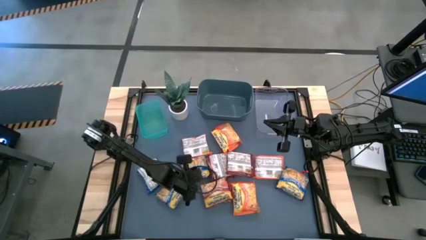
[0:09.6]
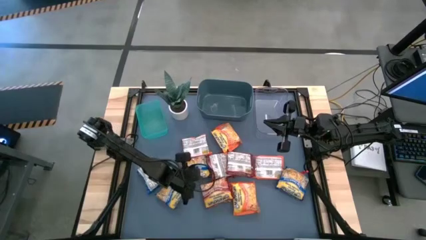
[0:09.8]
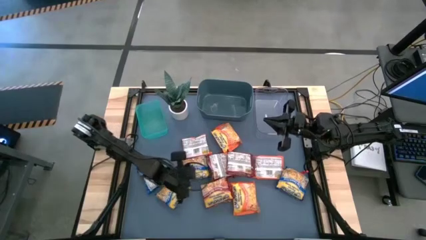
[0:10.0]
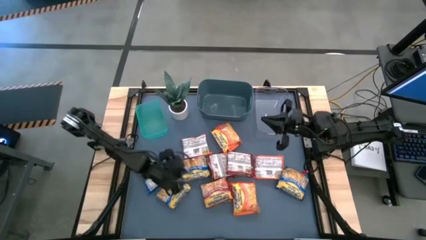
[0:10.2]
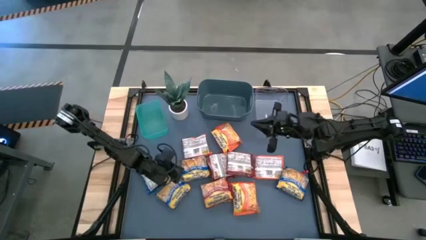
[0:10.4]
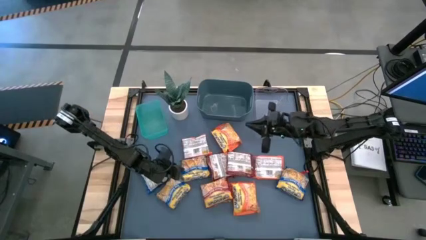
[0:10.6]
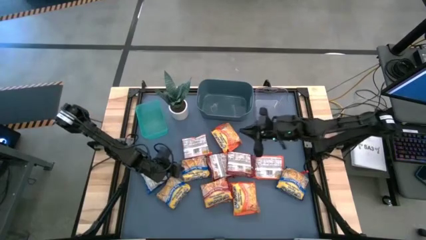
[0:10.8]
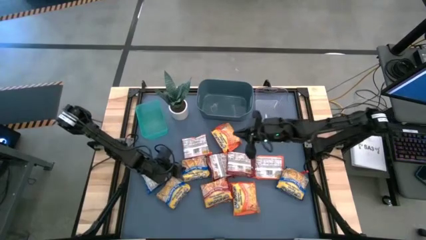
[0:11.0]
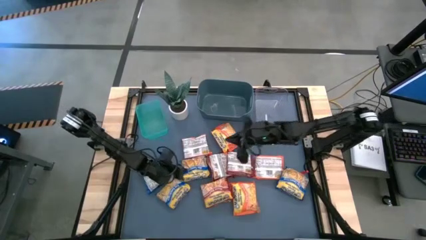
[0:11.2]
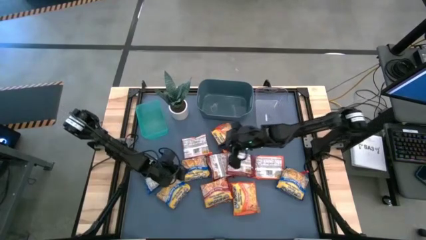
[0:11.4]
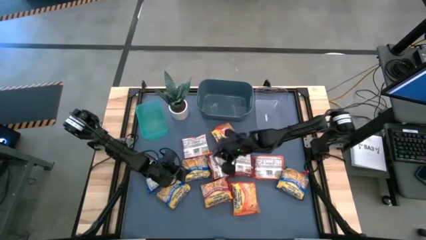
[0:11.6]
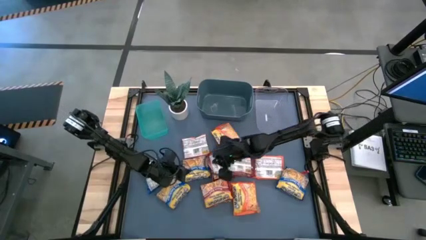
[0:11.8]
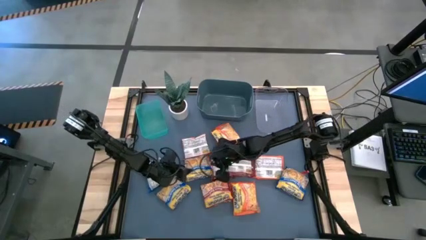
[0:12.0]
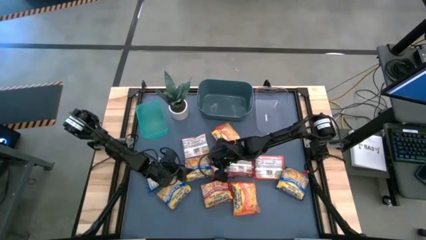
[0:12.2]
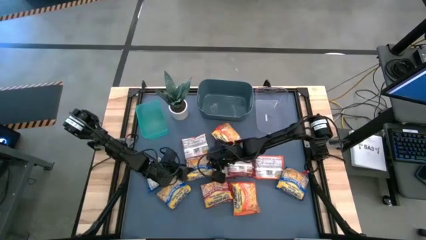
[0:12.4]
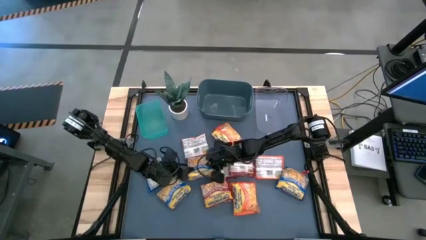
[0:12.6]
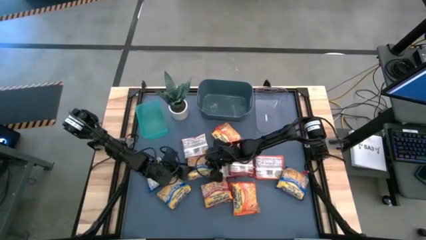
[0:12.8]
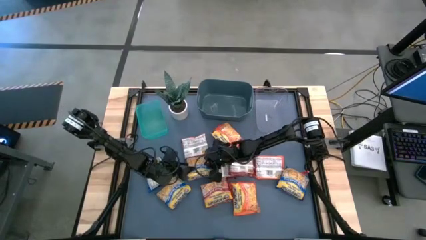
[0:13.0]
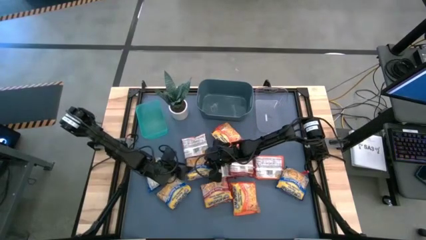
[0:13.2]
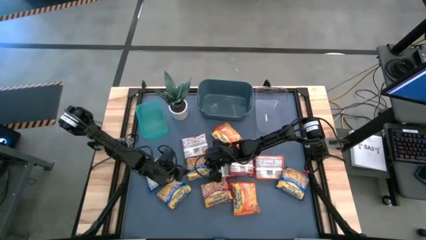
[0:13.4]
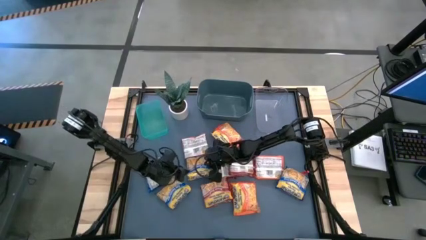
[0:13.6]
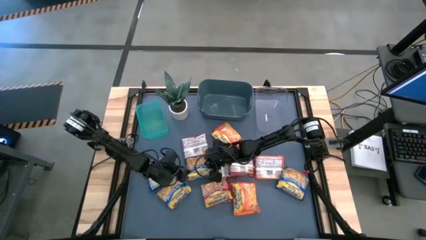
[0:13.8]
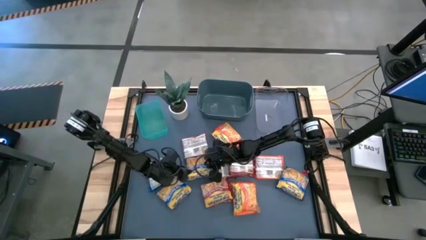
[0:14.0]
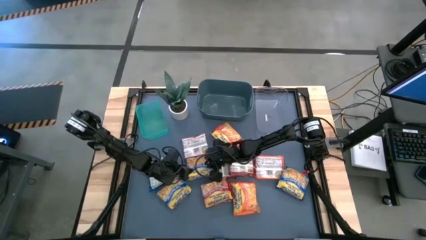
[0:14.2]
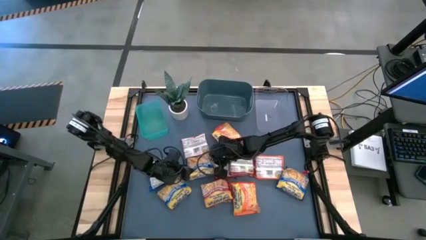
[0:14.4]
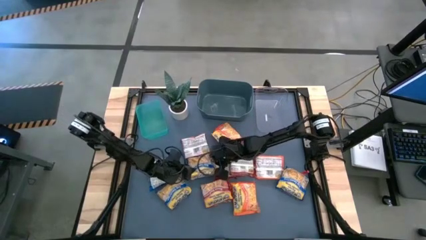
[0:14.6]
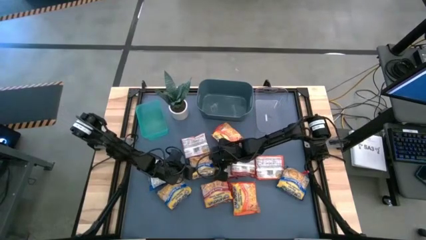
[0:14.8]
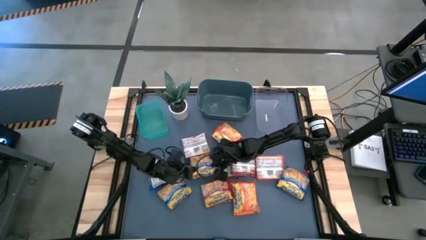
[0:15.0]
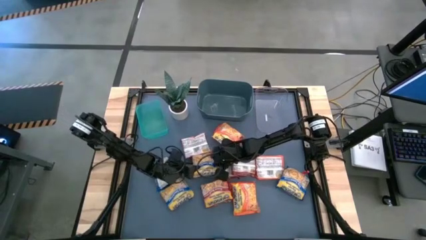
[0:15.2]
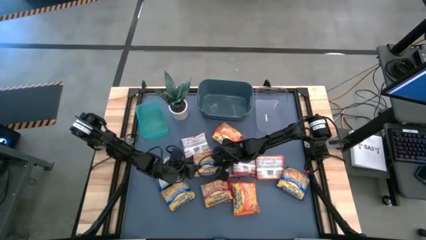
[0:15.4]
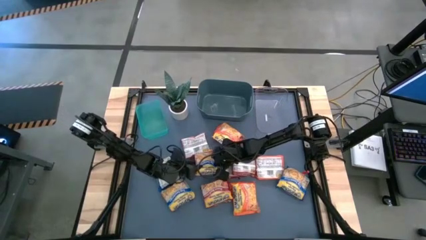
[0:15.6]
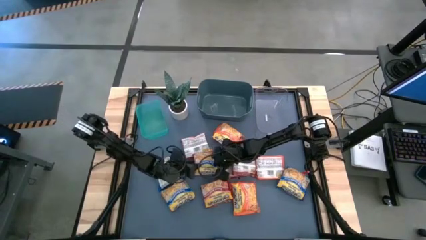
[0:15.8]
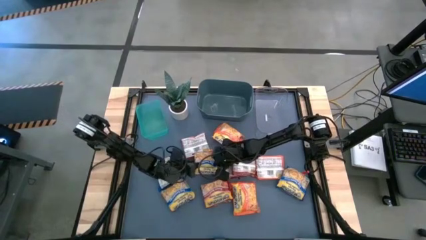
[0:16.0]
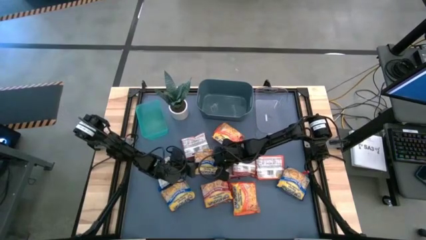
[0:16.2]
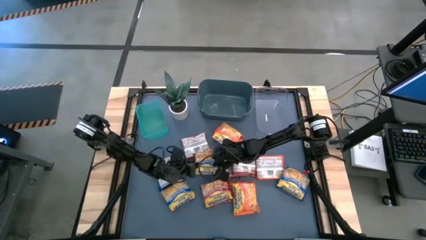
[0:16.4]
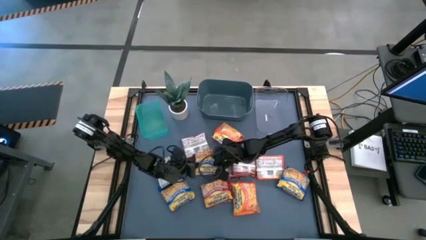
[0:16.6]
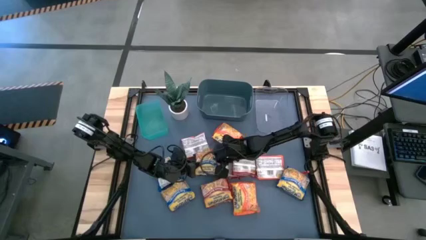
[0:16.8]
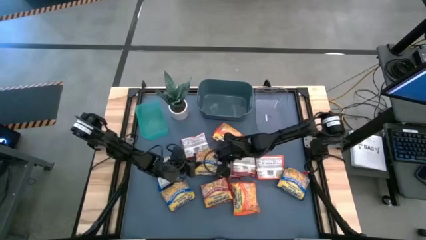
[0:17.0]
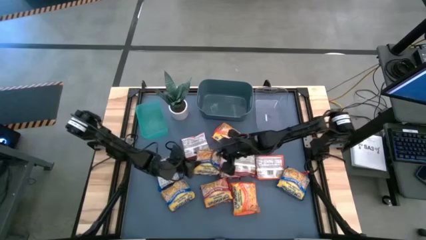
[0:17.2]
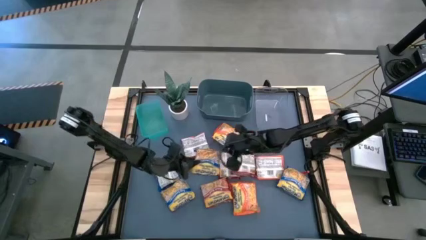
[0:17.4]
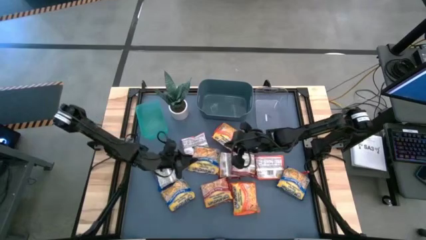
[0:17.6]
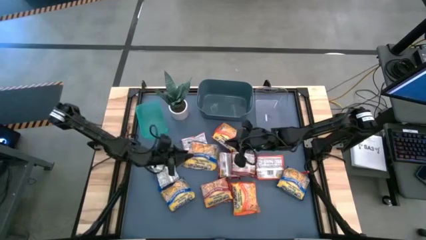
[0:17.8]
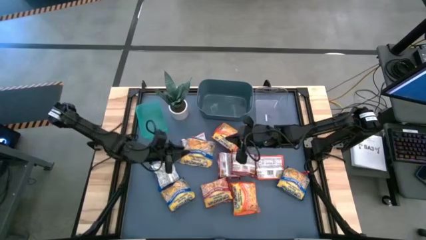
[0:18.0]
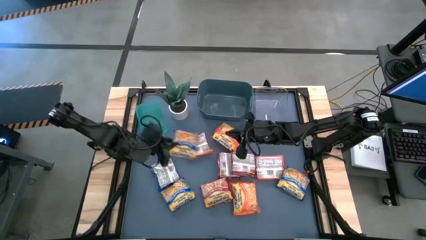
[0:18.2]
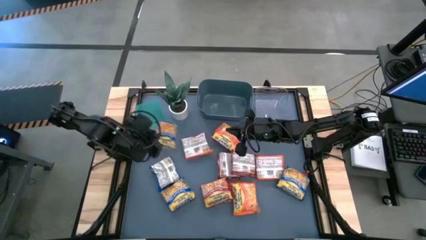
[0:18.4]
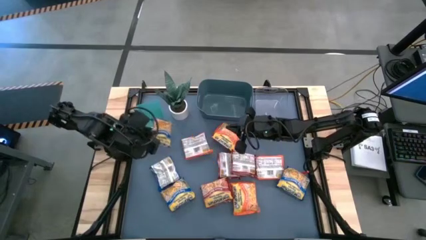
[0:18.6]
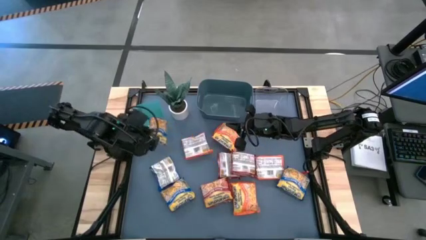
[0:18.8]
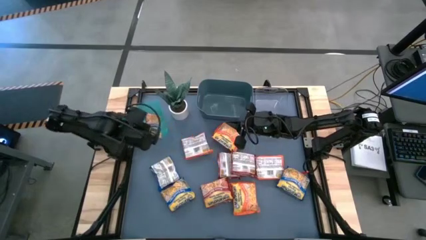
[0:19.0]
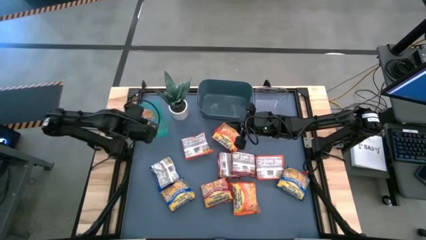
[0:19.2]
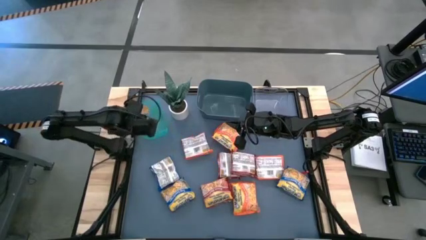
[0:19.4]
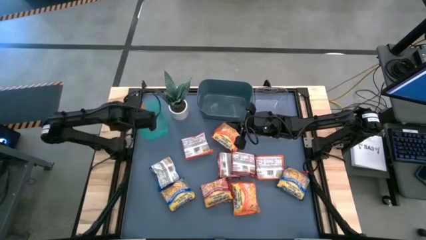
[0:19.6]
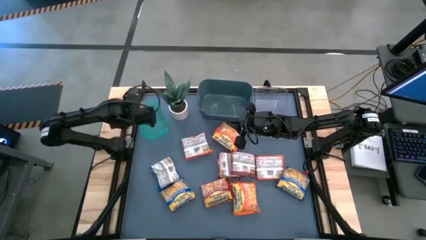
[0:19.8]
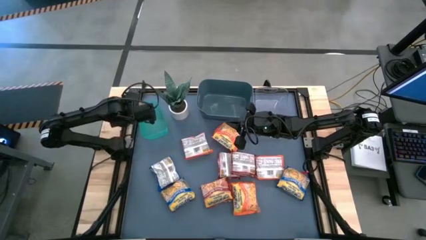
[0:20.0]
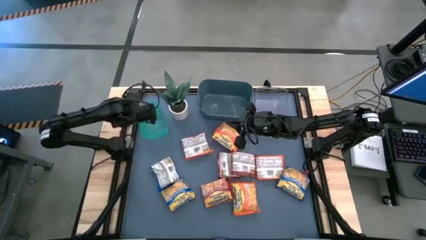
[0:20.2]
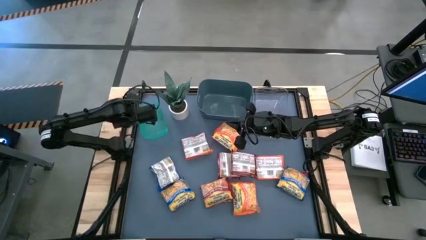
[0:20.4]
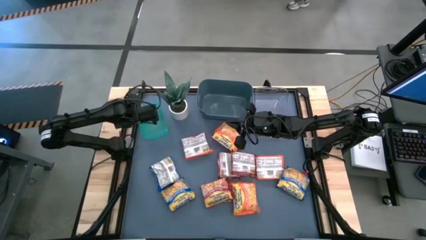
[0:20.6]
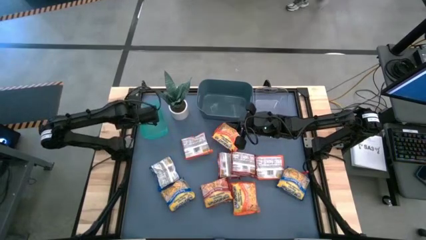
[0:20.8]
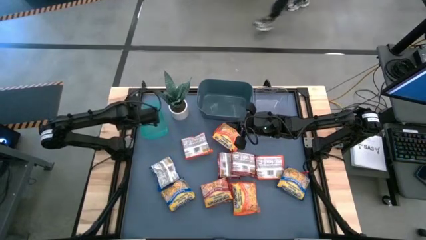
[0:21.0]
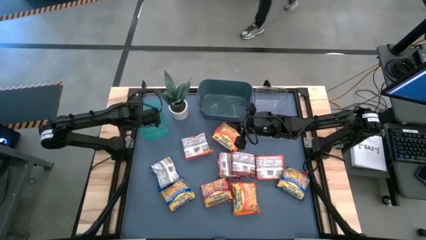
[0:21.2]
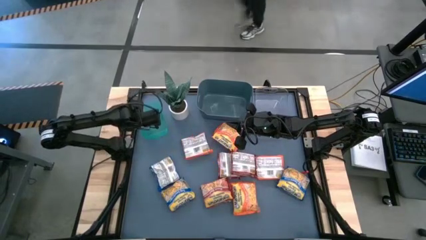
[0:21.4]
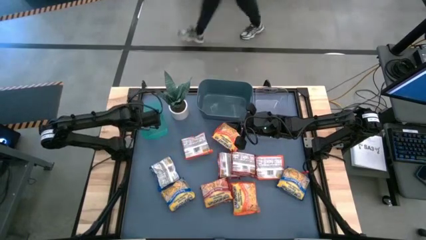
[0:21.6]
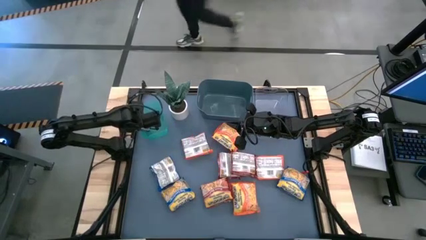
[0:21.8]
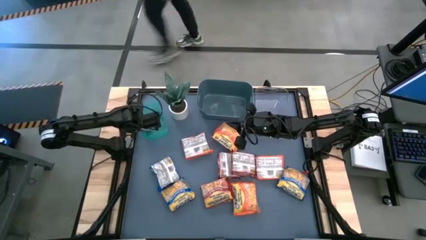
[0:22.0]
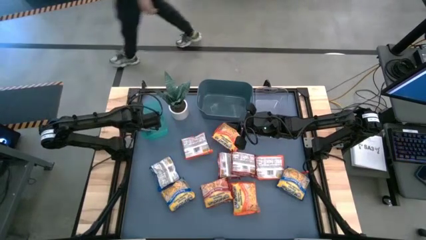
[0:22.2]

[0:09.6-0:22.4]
Task: Sort Maruchan noodles
Put the blue noodle pack into the green bin
